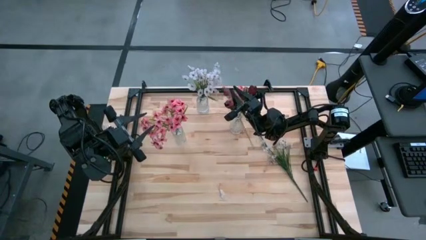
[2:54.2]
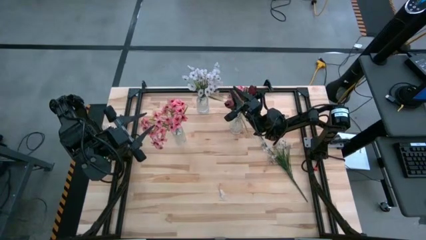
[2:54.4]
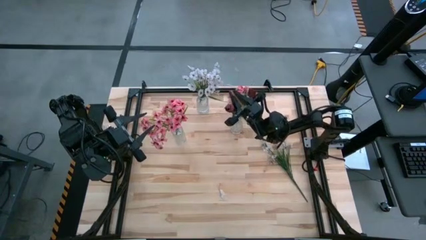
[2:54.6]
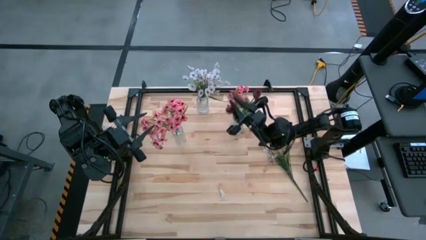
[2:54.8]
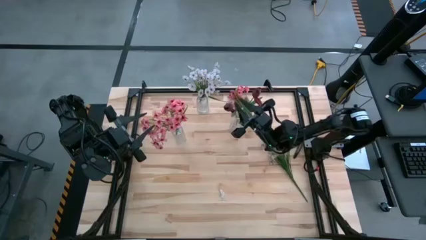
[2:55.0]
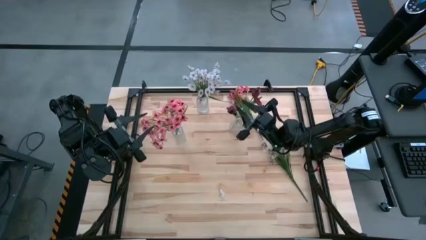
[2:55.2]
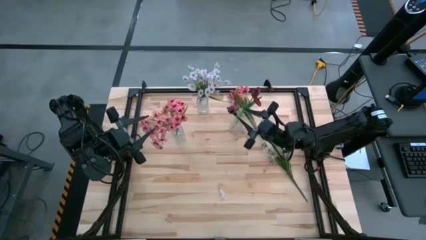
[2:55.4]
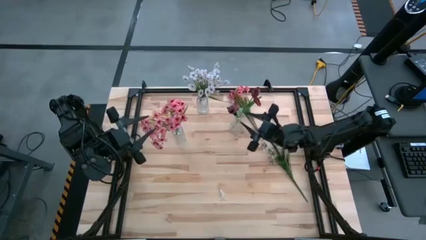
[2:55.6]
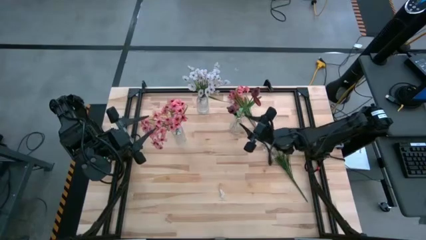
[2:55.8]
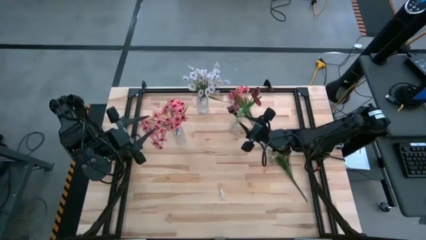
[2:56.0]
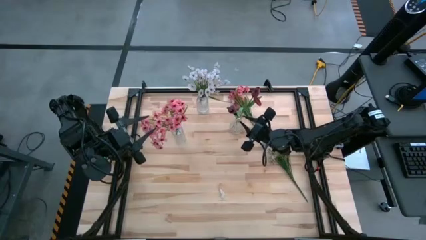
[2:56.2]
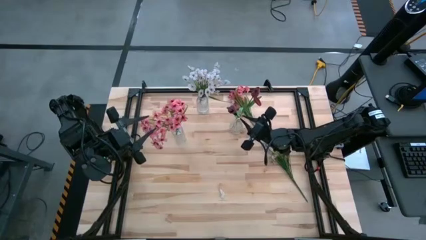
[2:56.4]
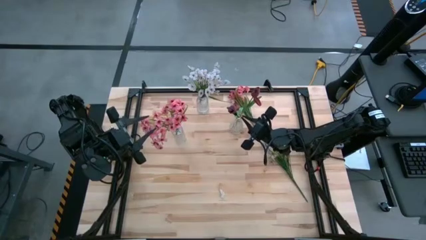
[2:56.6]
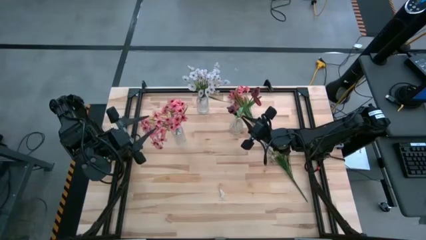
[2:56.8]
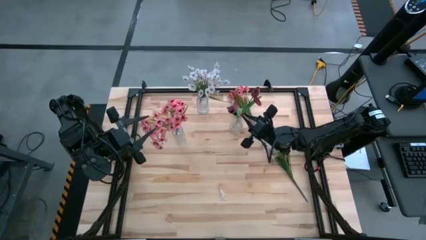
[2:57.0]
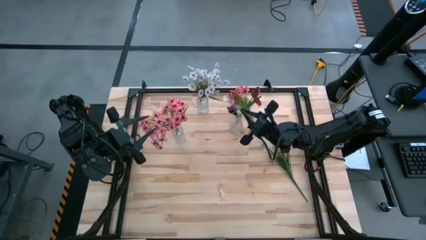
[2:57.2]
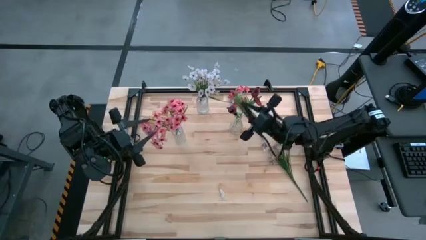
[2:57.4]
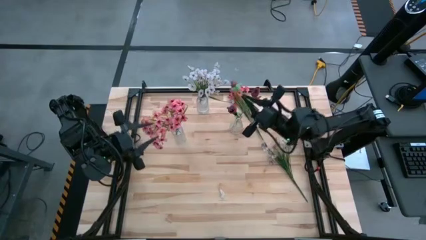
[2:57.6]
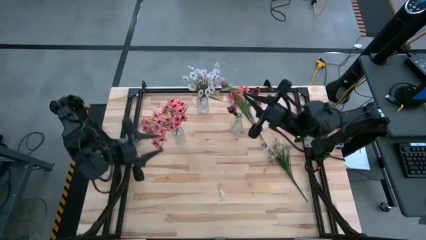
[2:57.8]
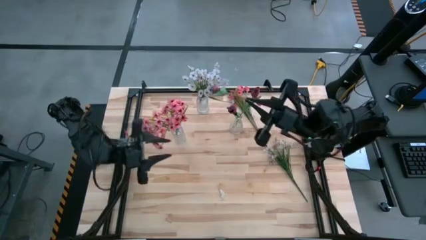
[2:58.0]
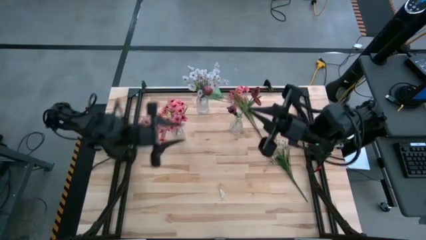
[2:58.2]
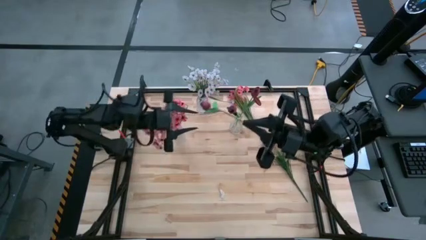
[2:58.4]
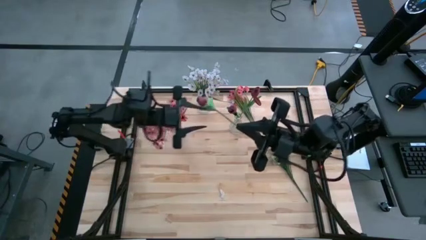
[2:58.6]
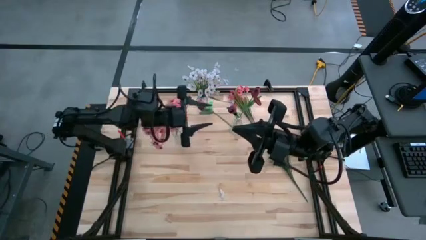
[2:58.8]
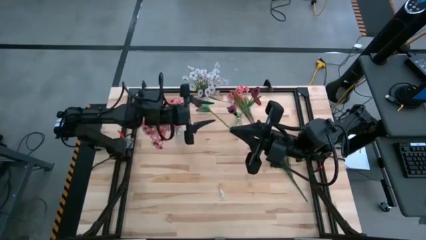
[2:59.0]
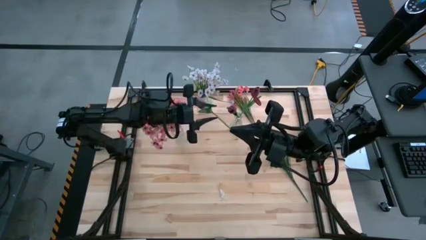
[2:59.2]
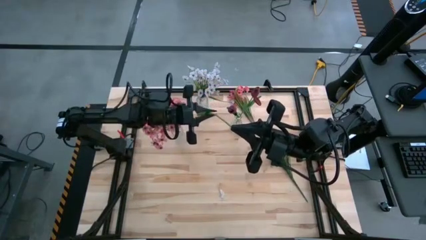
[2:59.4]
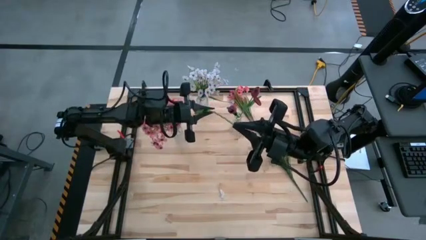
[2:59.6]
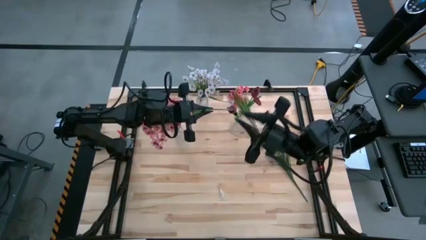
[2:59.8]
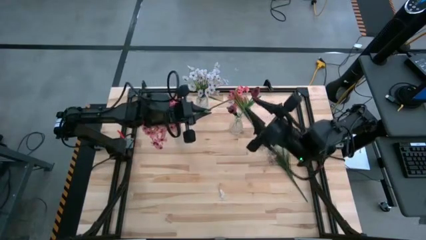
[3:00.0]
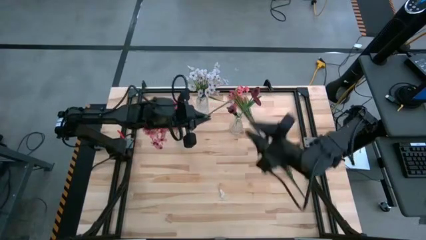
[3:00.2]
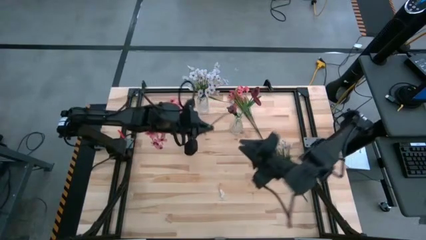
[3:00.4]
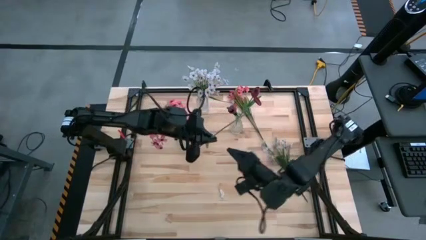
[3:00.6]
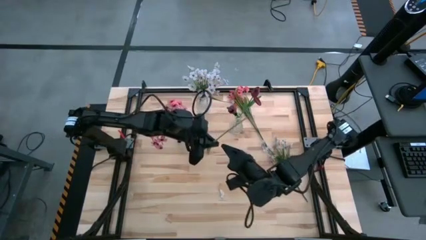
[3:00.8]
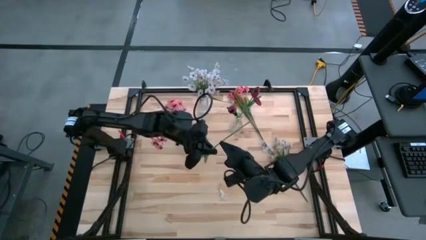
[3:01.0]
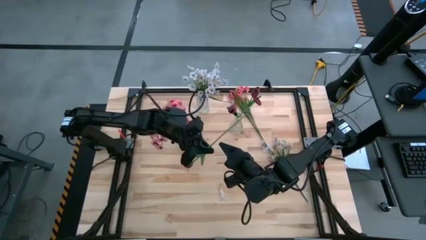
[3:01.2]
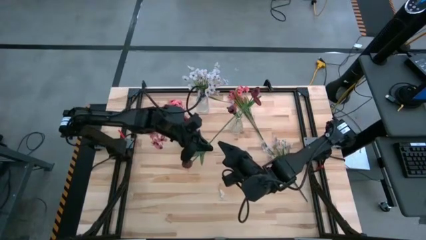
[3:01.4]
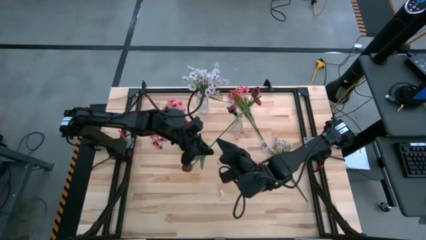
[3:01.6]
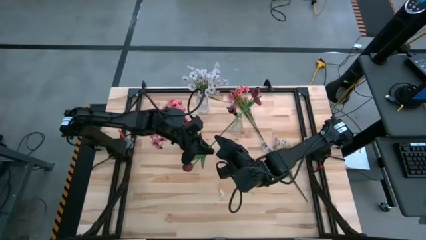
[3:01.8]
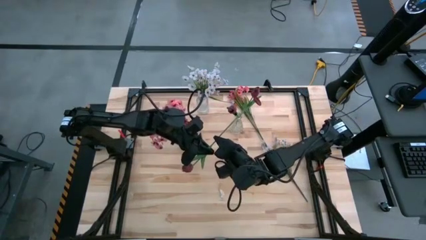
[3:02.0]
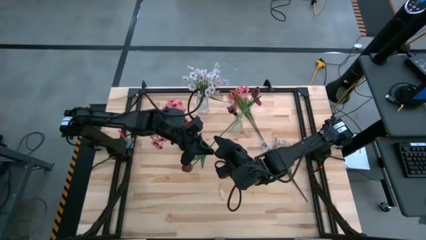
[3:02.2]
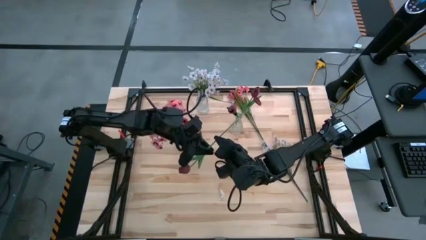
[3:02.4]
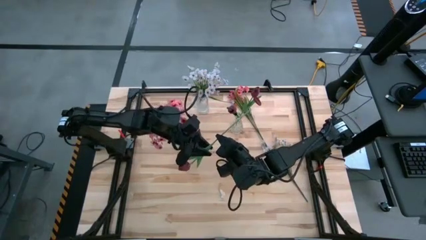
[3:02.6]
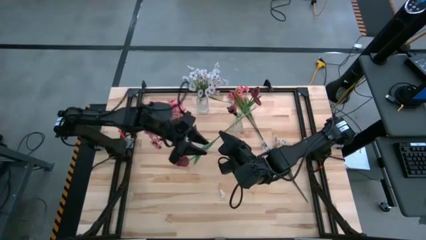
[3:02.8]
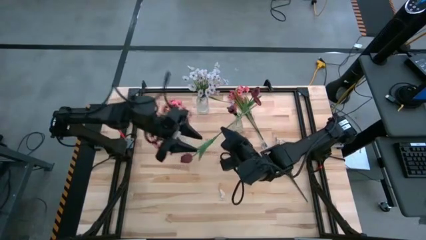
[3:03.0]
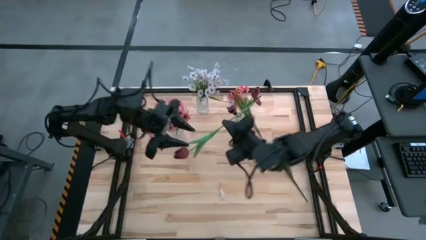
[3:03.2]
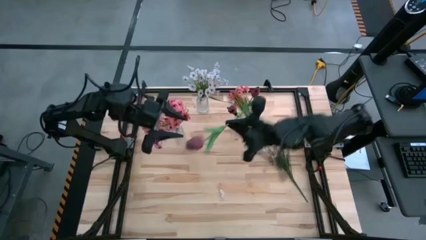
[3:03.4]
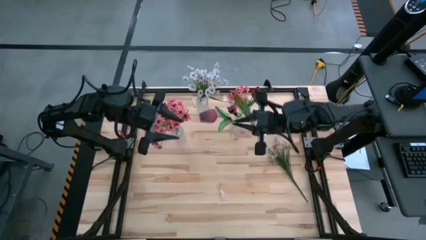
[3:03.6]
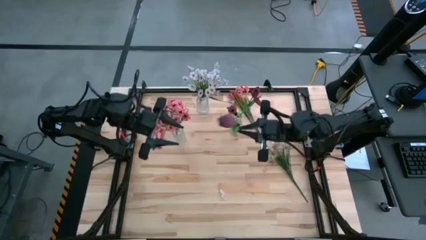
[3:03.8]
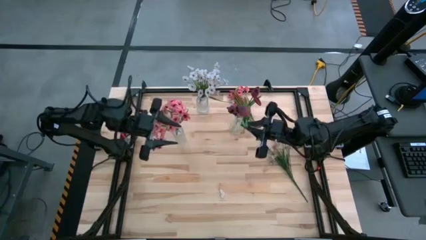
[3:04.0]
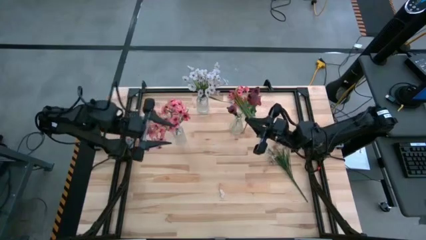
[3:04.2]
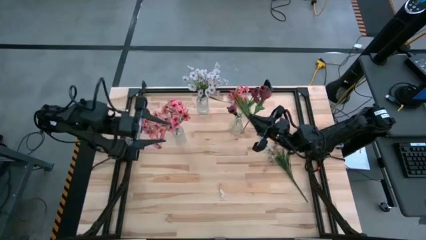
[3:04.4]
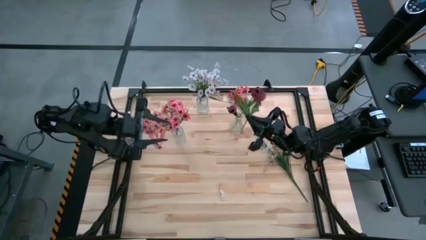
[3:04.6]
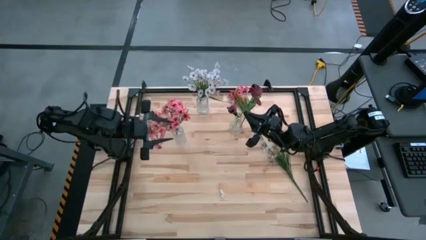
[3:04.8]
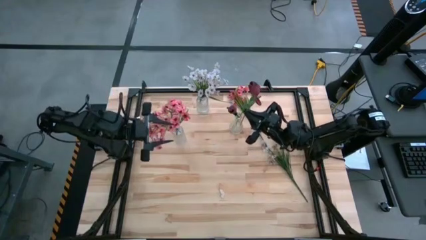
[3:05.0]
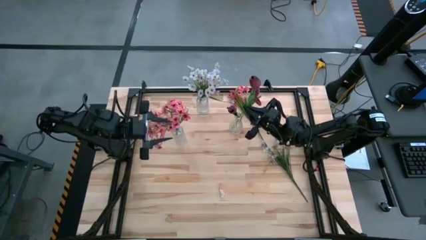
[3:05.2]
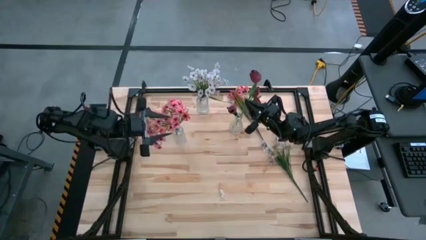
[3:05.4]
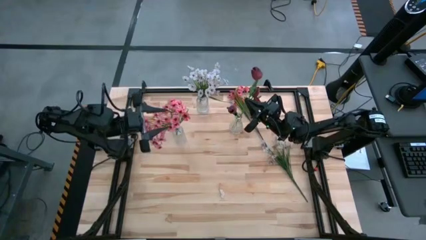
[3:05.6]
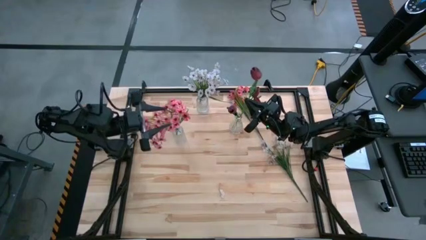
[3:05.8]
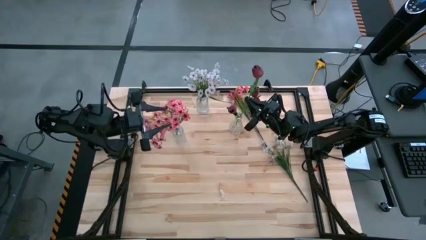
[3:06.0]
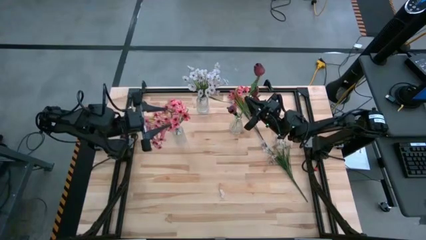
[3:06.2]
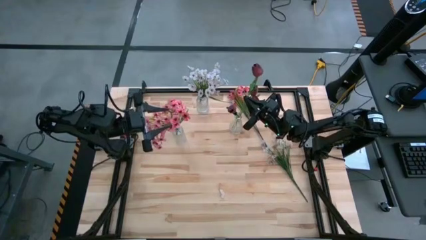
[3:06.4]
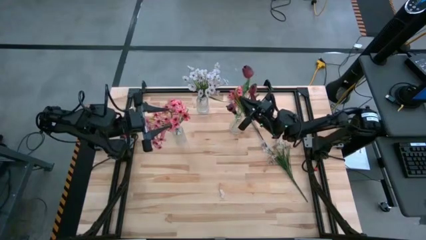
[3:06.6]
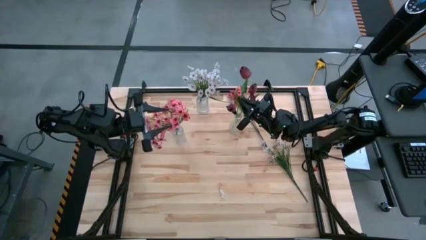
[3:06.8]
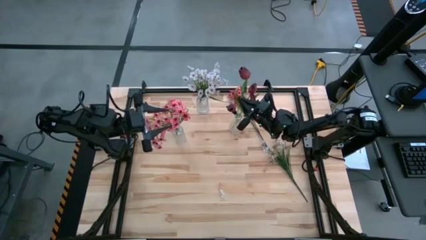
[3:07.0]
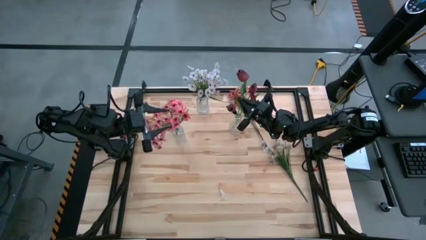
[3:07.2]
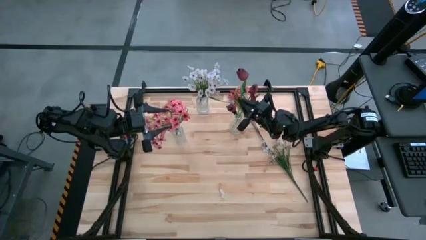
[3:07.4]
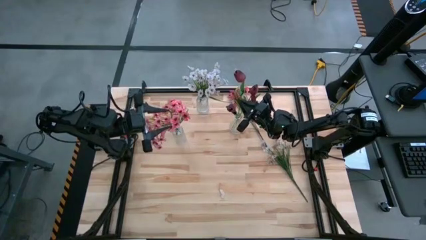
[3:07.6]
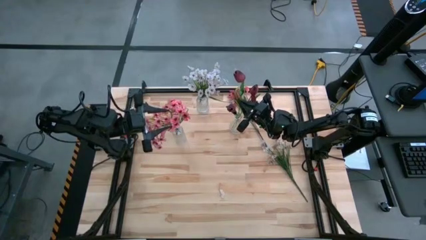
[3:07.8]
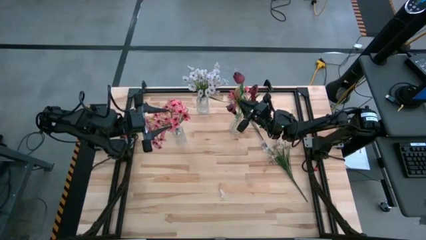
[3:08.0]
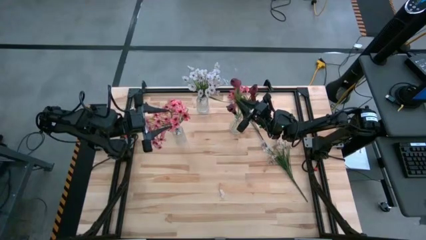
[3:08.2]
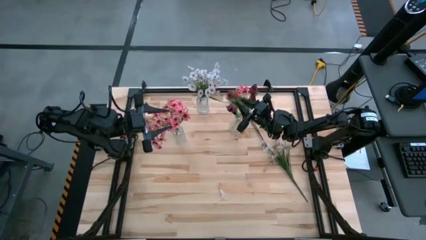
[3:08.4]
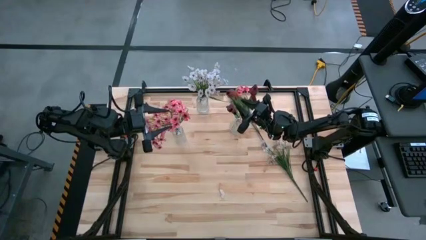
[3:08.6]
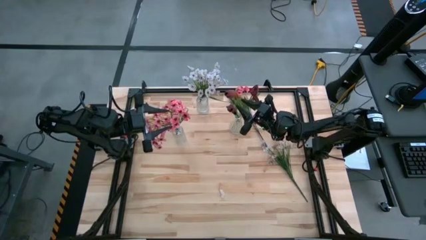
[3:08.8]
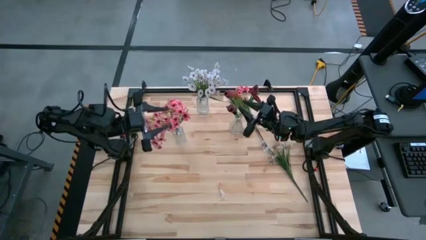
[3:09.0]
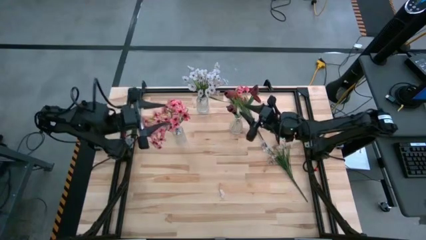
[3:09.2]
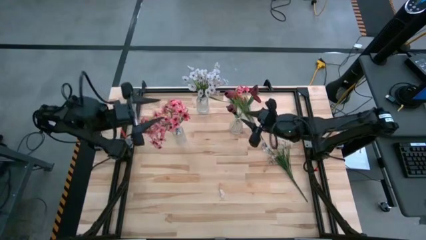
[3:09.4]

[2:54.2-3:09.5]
Task: Sort flowers into vase by color
Put the red tulip into the bottom right transparent vase
